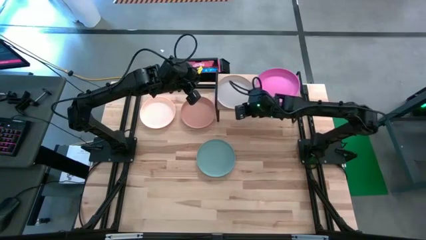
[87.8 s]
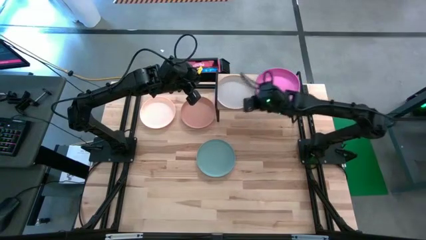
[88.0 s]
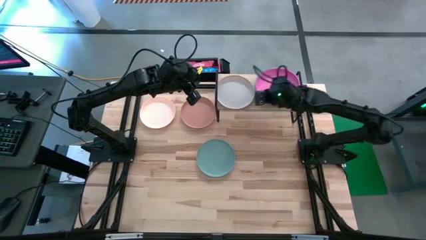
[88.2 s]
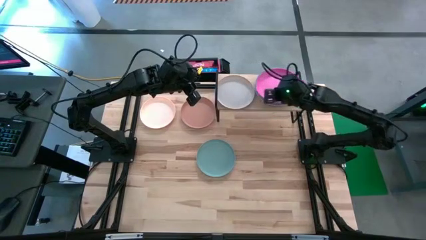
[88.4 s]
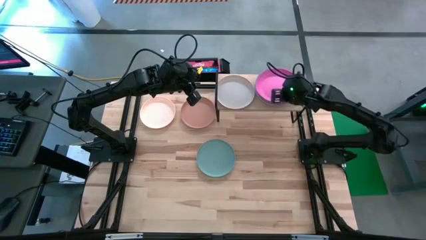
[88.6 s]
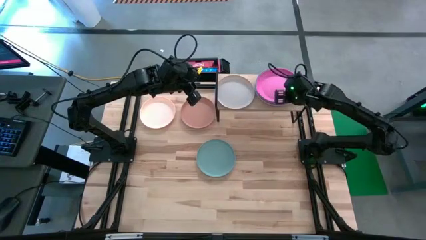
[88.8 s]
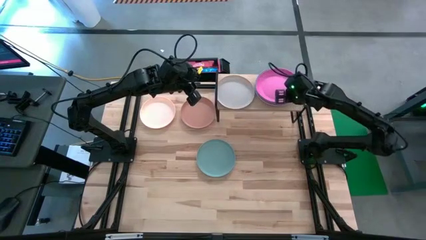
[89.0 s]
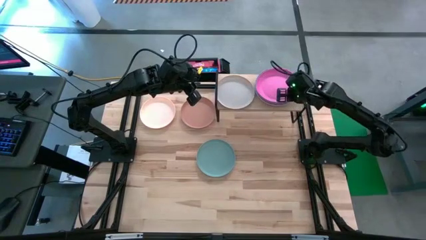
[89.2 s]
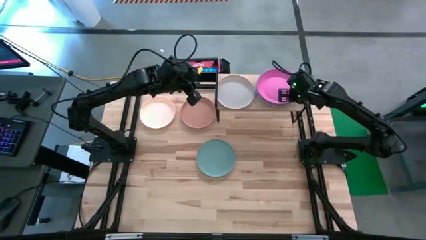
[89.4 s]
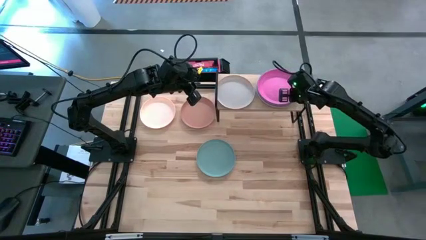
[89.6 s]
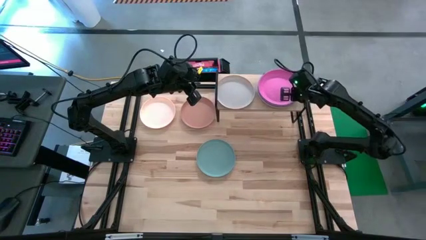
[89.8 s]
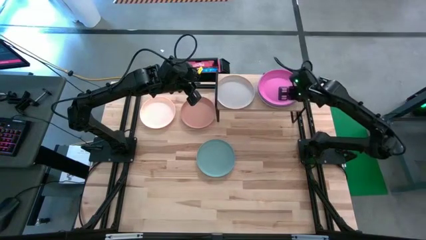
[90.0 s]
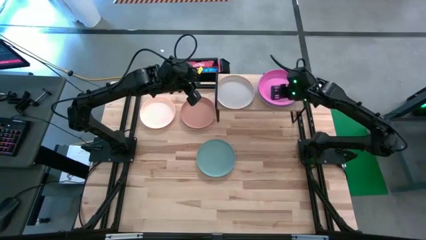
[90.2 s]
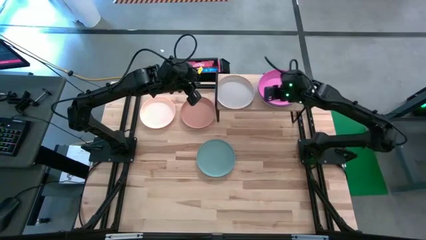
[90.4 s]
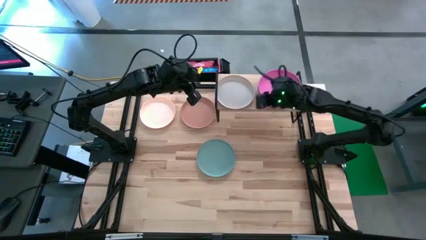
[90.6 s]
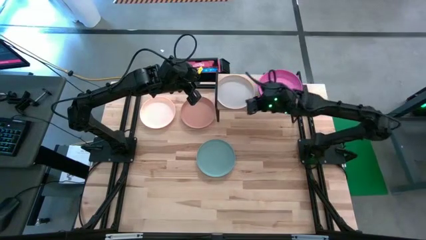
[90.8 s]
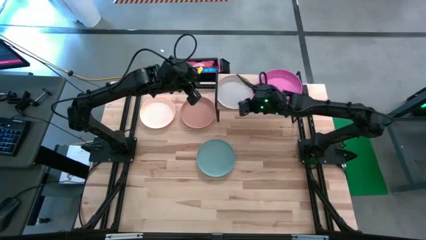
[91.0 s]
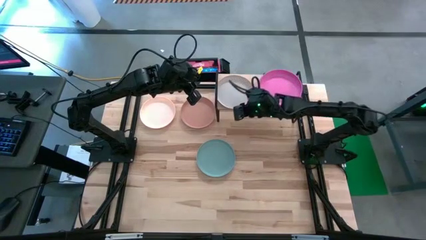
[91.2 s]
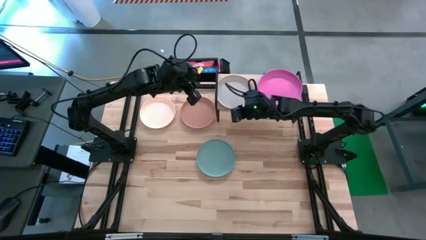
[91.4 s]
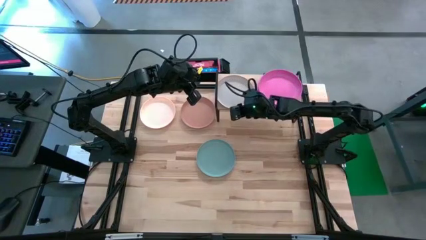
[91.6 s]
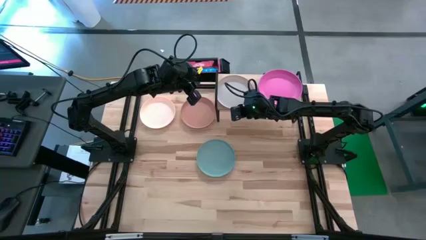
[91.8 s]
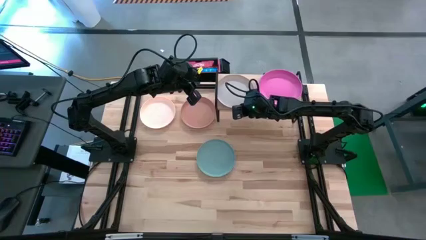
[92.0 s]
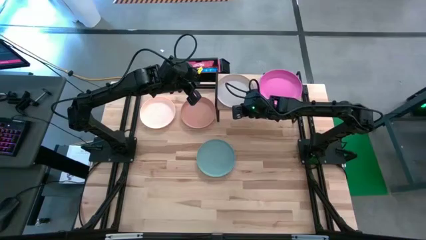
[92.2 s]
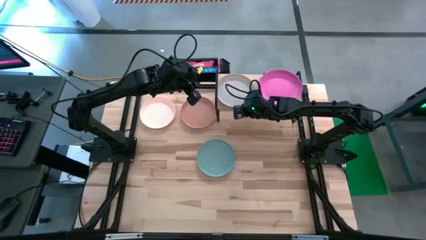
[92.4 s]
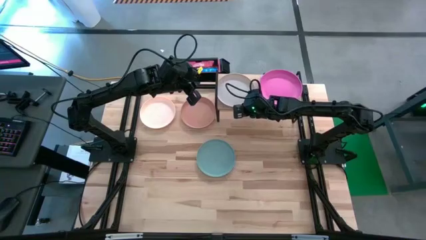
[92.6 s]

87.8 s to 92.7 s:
Task: Place and stack plates onto a shelf
Adjust the plates on the shelf

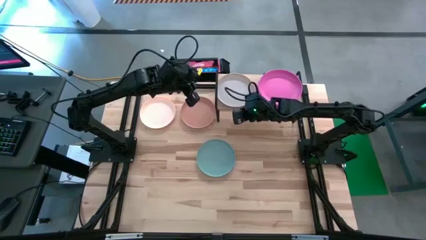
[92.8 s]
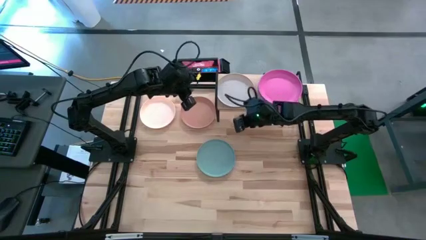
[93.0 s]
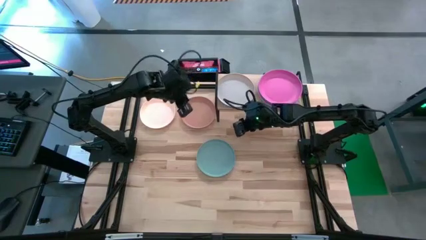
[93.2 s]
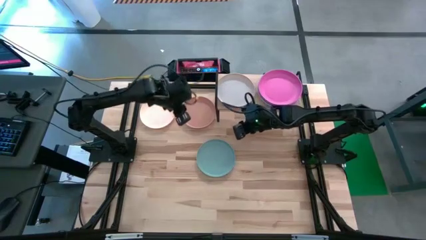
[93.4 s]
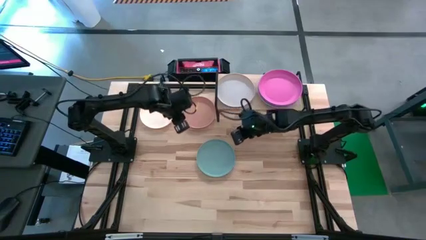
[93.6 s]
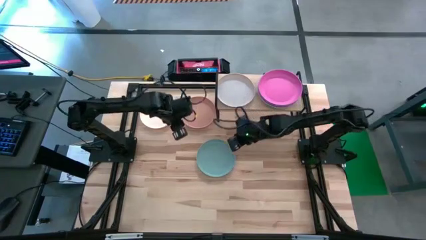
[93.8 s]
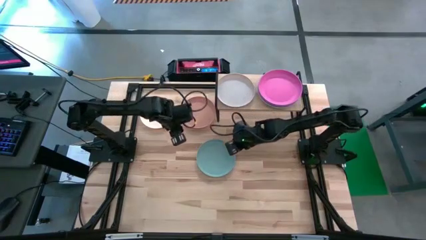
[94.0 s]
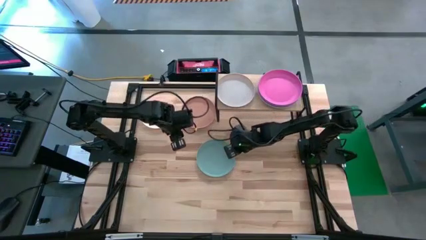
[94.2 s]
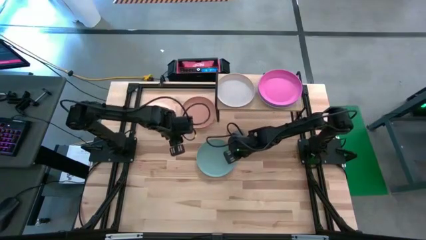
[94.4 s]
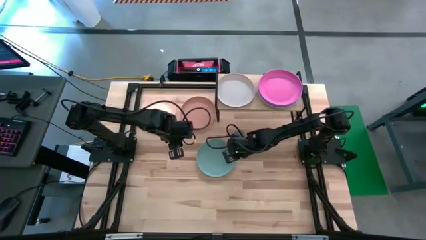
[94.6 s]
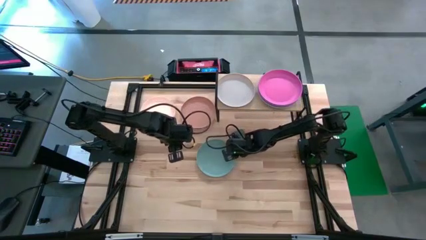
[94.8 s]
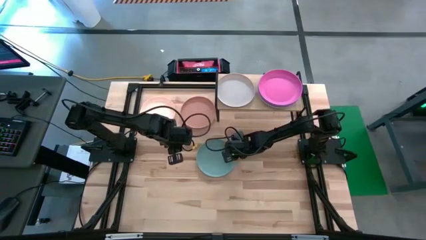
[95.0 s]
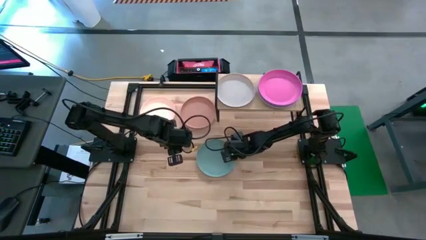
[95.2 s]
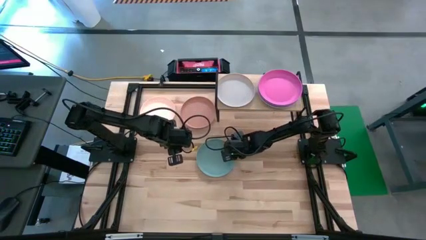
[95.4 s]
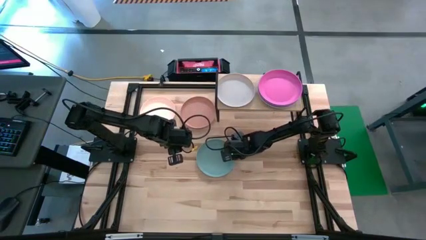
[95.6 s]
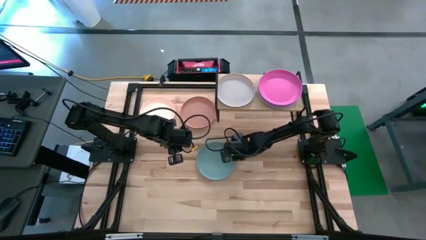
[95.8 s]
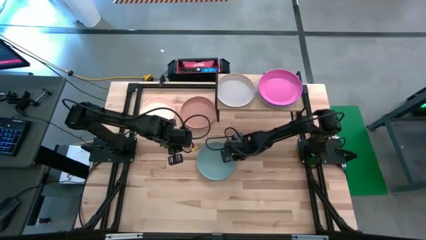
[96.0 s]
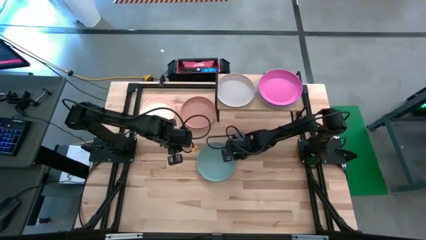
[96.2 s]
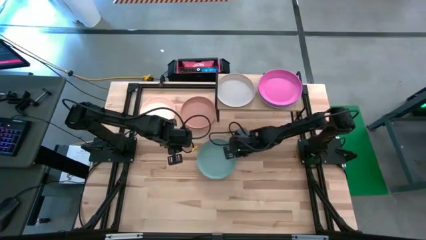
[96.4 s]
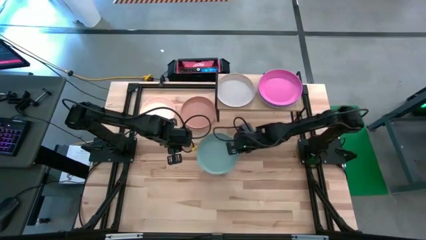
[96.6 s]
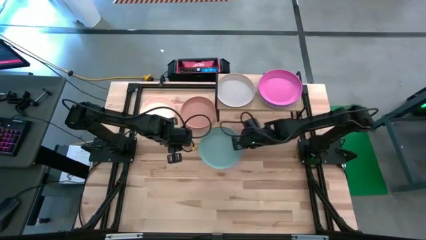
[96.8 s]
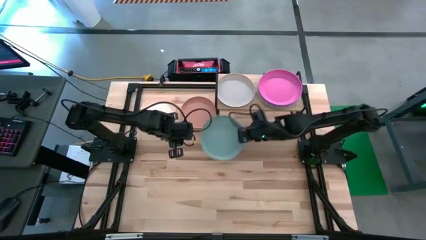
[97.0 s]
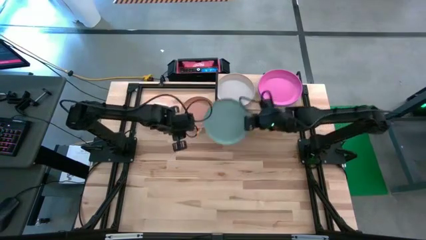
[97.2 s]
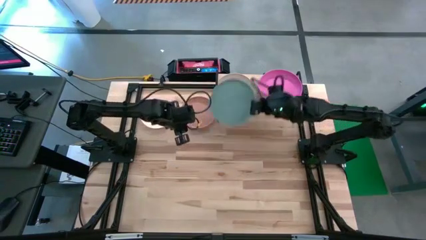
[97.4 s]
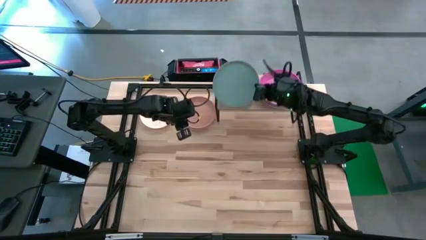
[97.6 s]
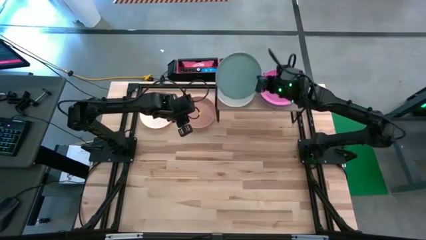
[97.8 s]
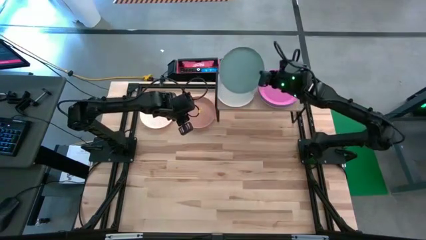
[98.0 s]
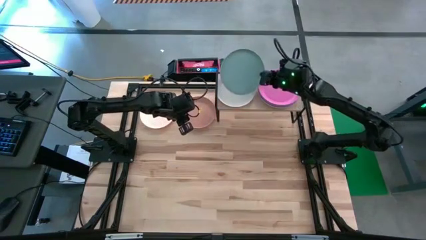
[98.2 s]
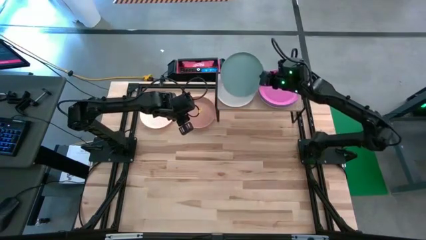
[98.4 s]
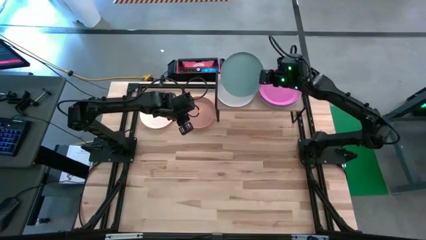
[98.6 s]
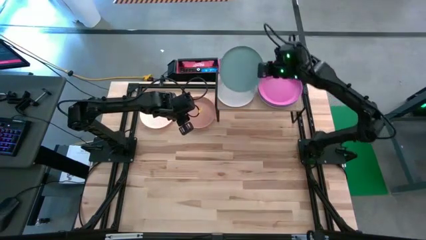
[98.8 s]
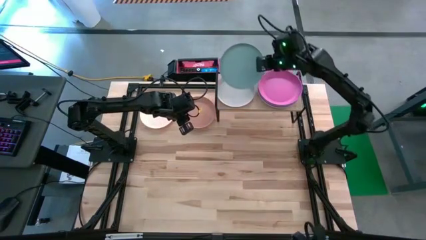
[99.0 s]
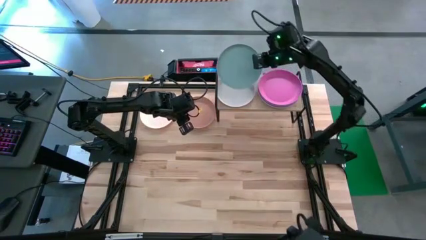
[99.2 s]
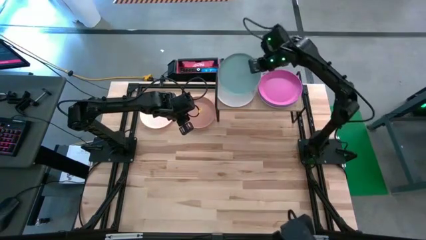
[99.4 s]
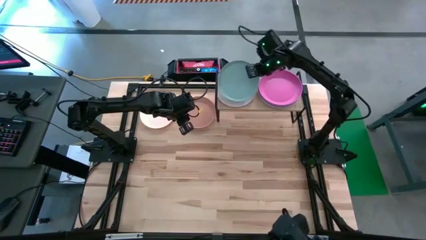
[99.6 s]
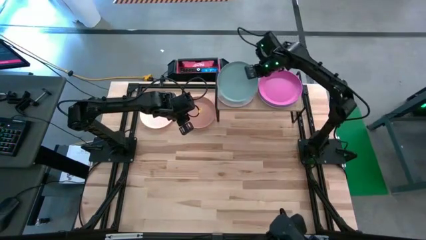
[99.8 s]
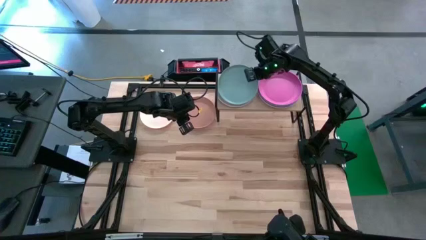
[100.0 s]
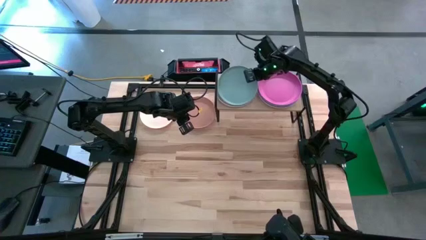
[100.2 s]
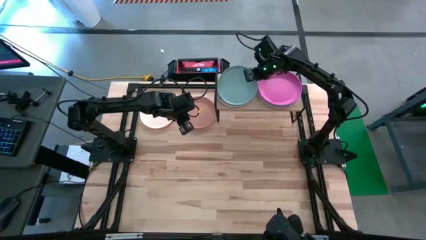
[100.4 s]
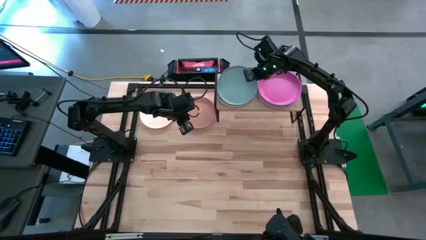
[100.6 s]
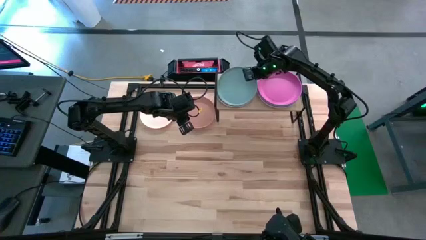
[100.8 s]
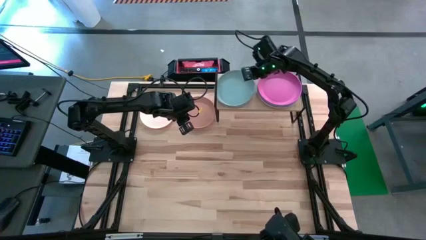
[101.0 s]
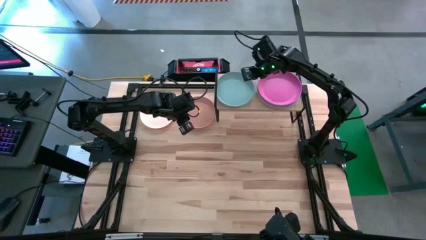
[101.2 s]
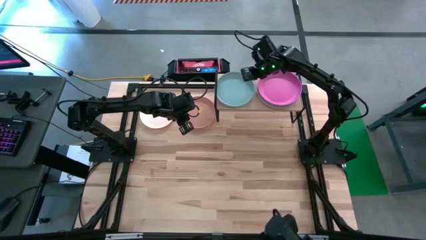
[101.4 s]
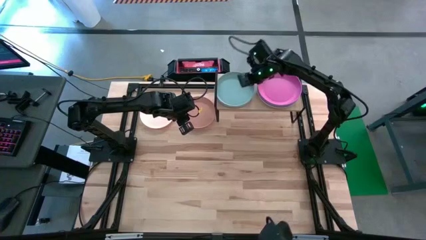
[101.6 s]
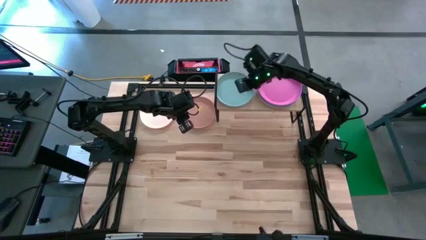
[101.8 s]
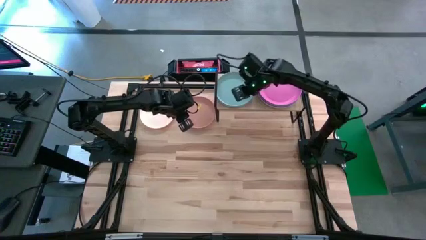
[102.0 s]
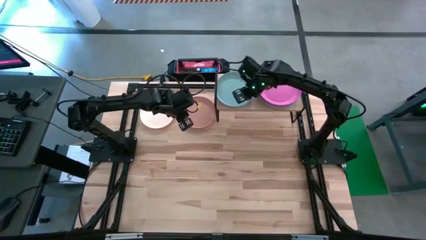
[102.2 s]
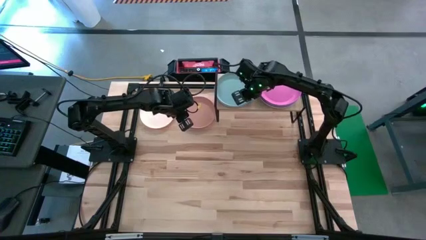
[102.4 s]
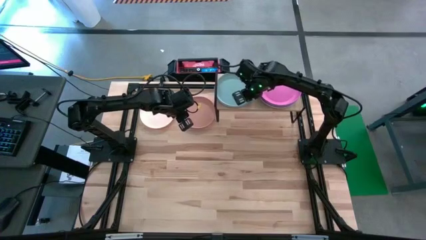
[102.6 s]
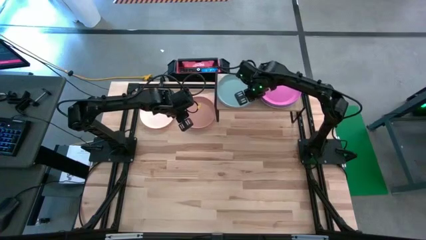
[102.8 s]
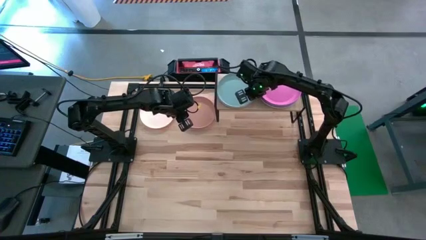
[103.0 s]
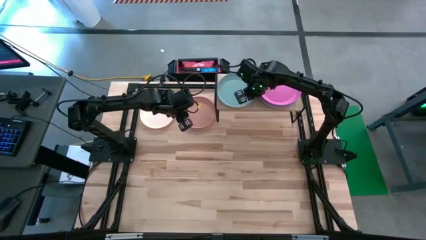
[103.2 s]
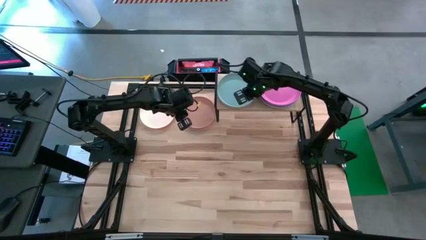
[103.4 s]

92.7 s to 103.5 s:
Stack the green plate on top of the gray plate on the shelf
